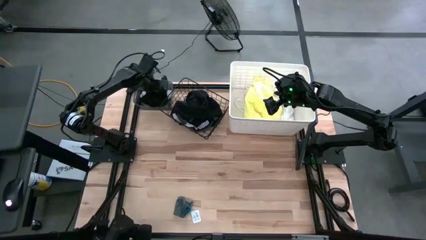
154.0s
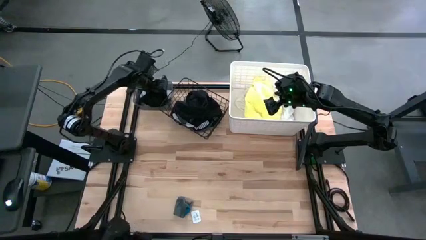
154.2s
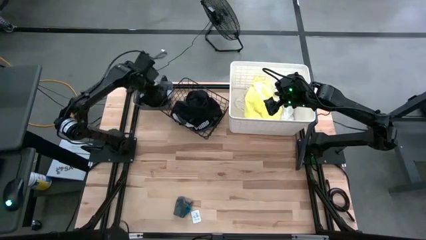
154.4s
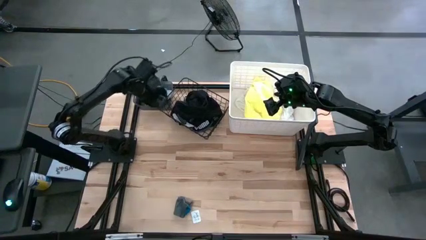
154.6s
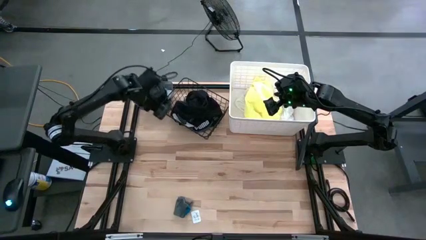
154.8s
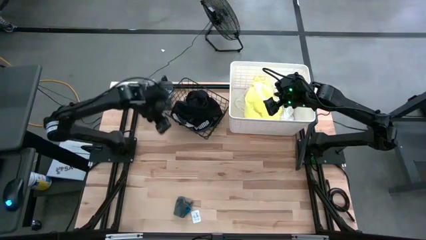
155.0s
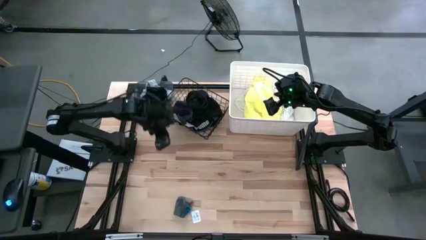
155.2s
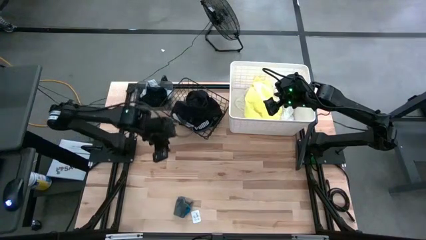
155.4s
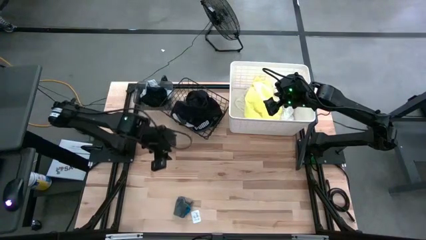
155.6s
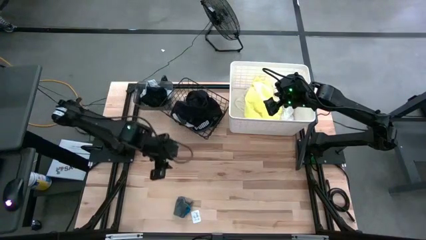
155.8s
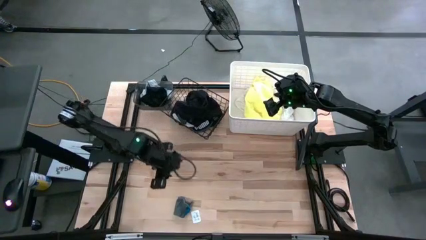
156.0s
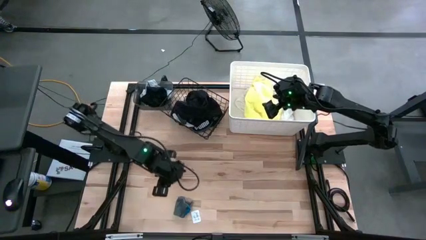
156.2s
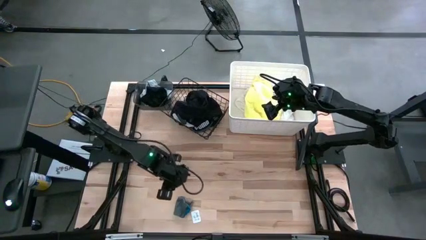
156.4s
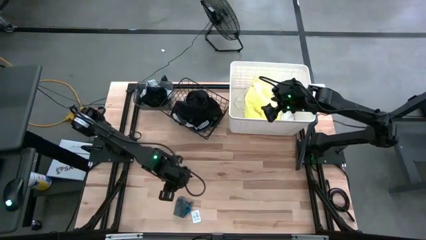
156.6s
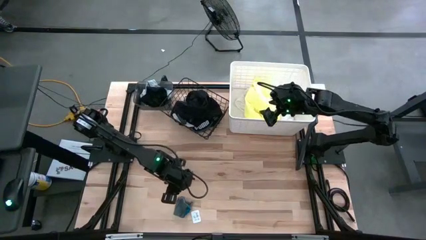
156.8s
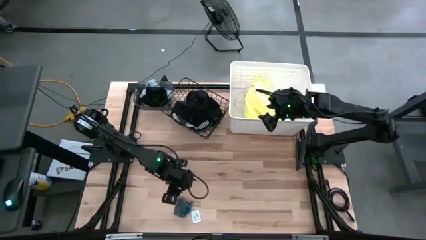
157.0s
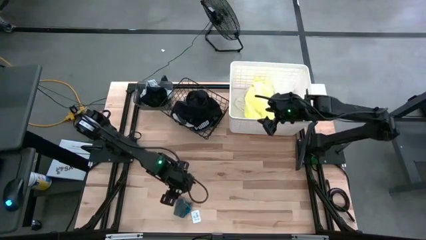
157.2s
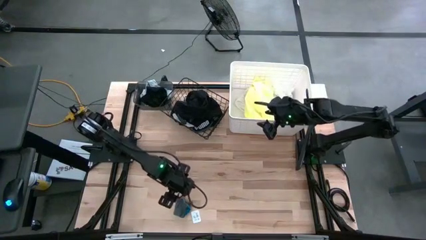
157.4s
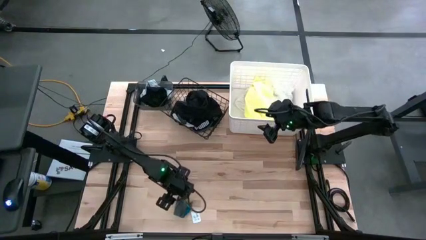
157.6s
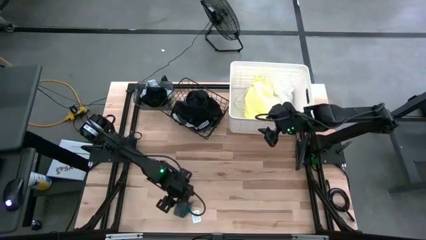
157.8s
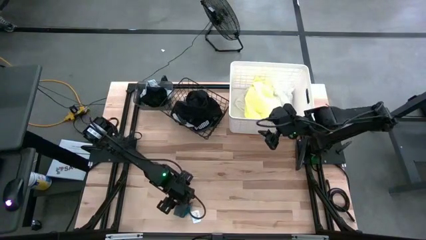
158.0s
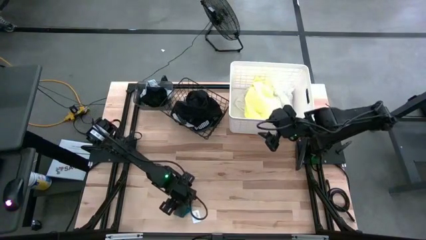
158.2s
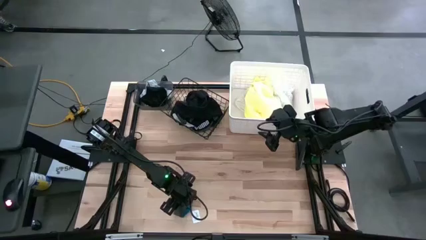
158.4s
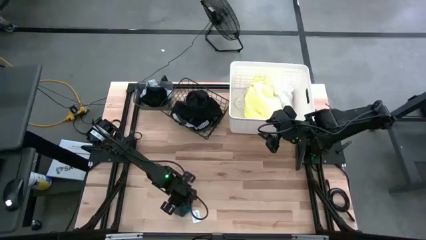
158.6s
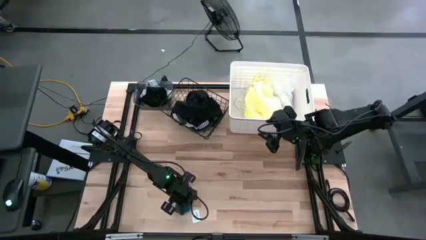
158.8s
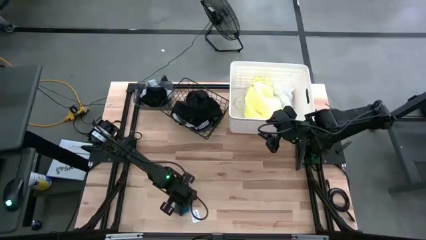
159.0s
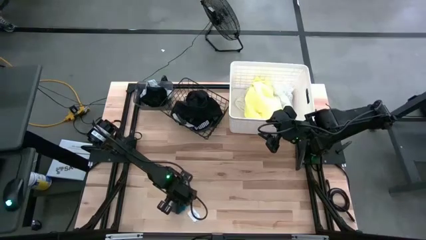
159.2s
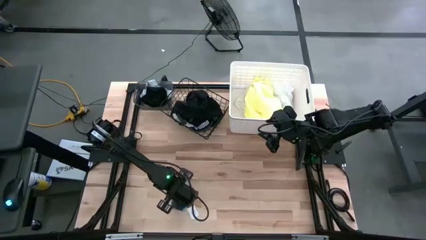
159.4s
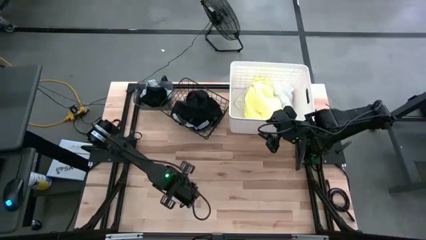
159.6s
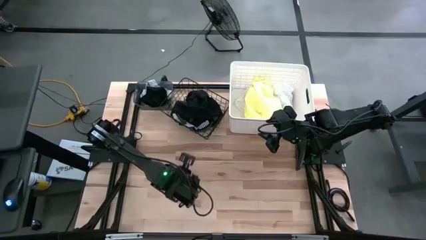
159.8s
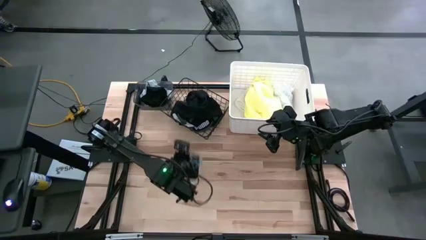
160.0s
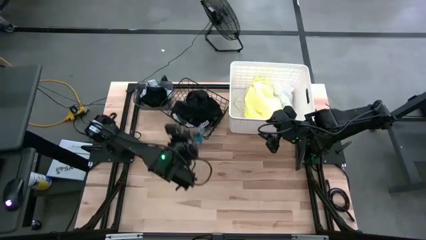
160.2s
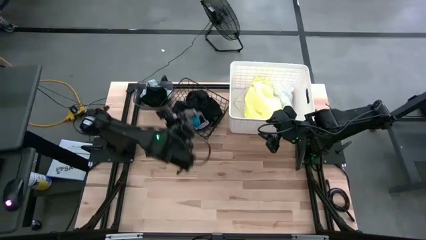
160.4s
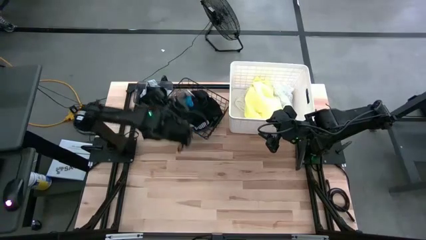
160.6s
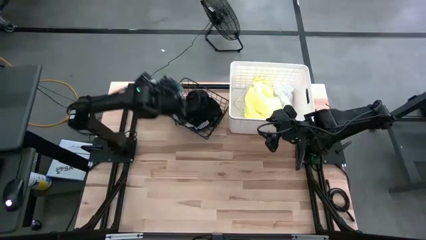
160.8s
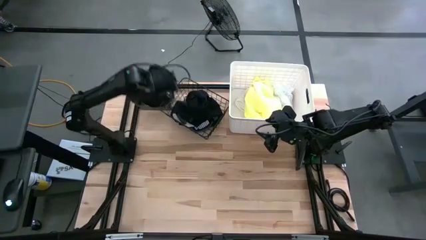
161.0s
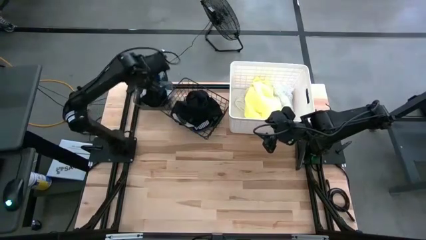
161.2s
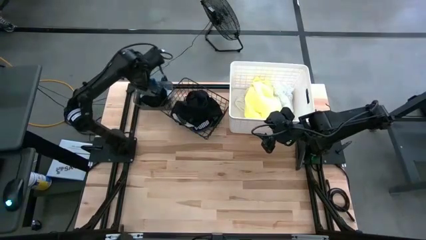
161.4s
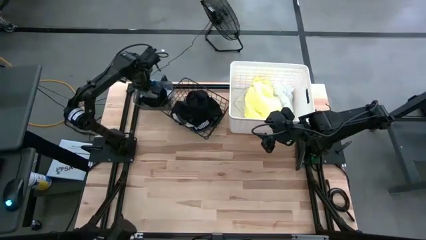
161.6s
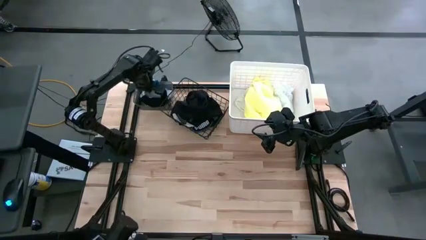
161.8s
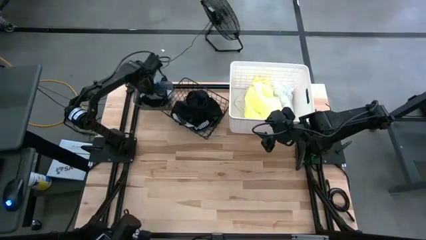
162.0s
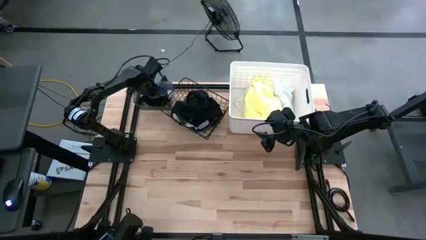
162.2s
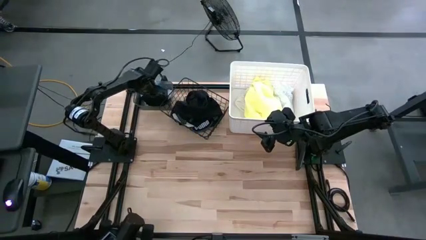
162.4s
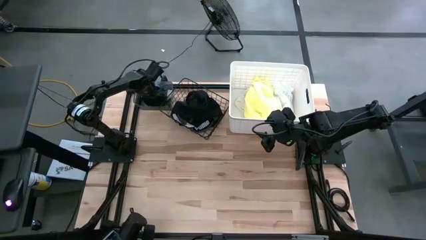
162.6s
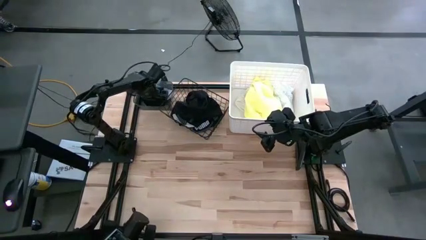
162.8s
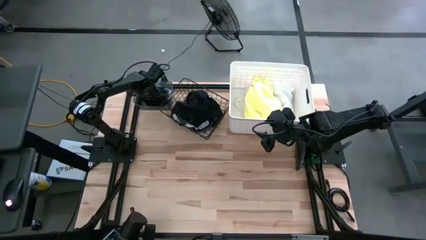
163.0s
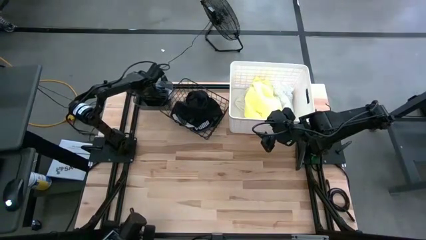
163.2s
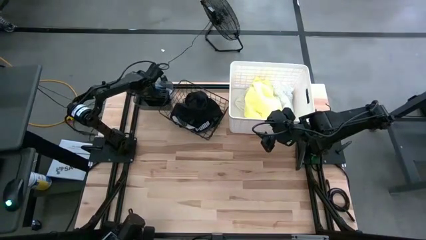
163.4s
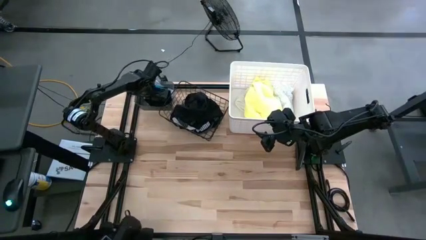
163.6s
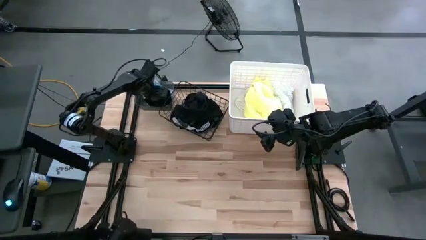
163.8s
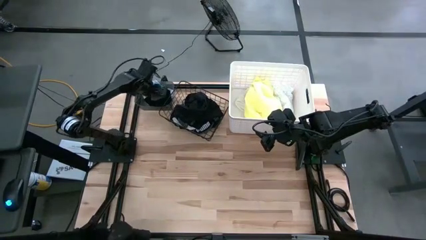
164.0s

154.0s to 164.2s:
Task: Pick & Place Cloths
Put the gray sock into the black bin

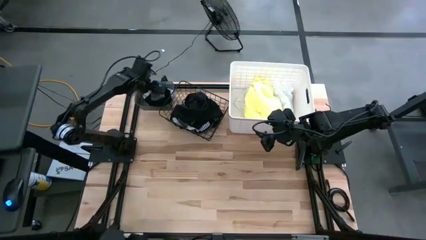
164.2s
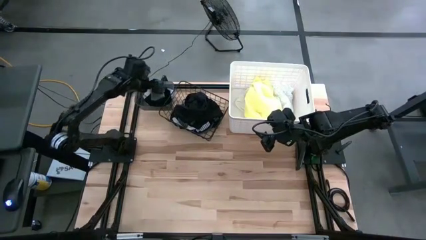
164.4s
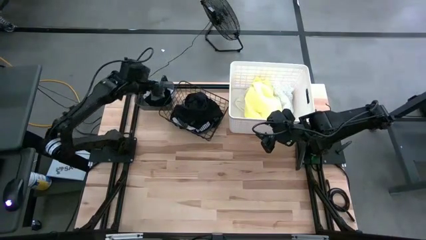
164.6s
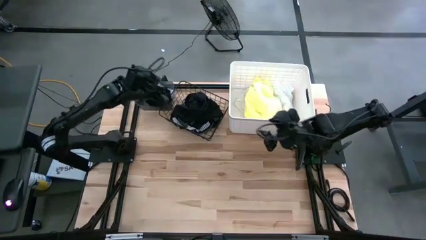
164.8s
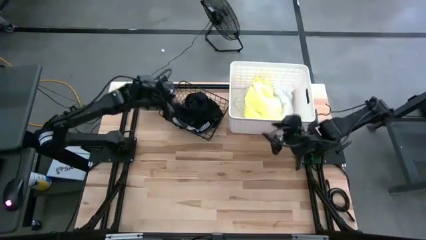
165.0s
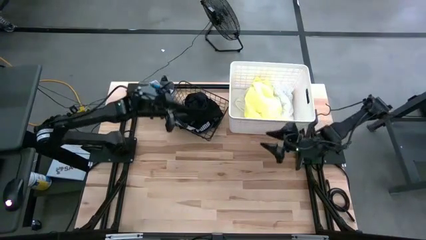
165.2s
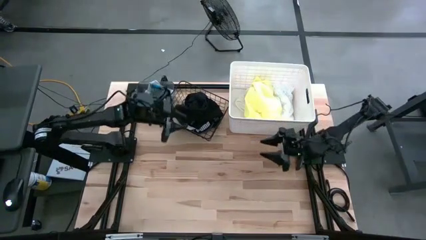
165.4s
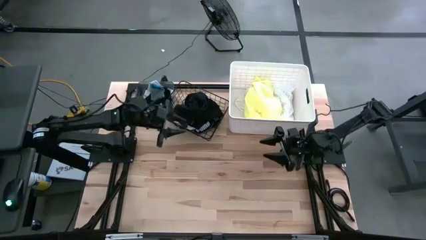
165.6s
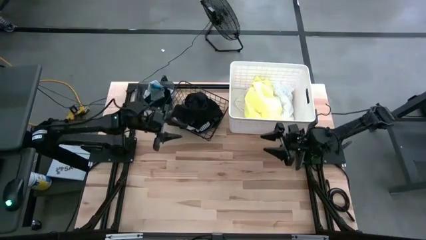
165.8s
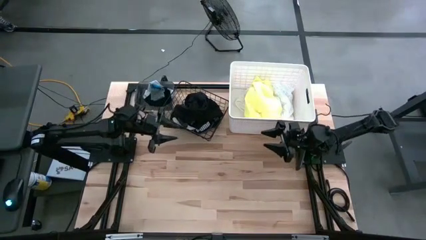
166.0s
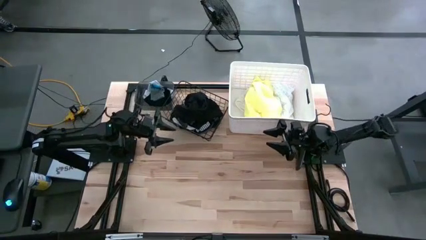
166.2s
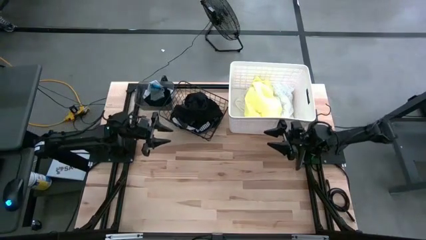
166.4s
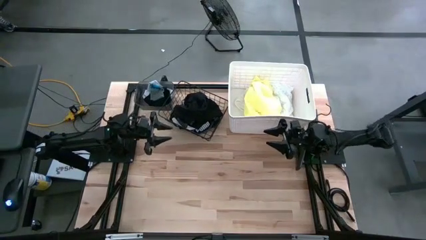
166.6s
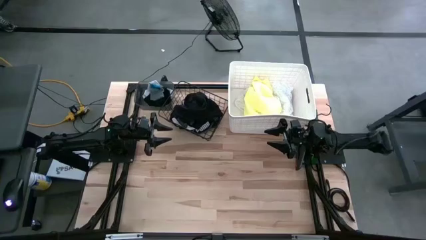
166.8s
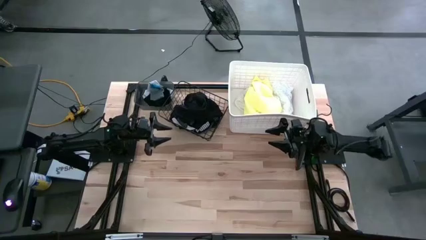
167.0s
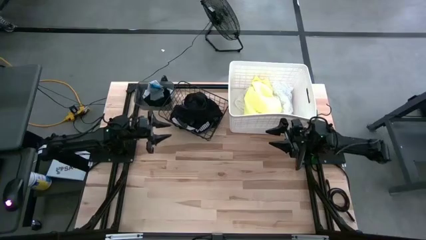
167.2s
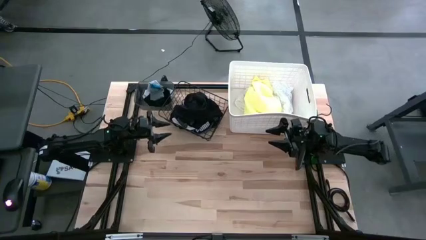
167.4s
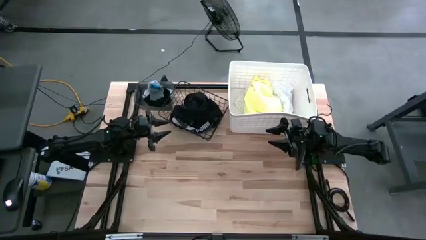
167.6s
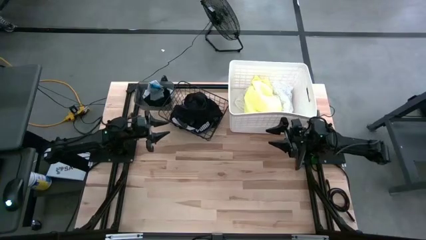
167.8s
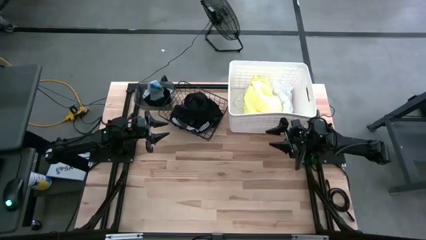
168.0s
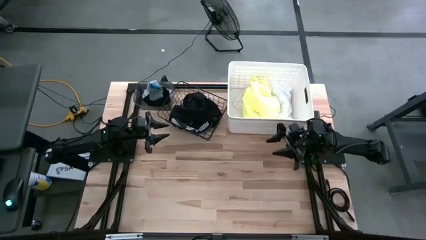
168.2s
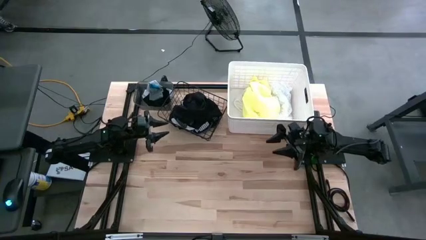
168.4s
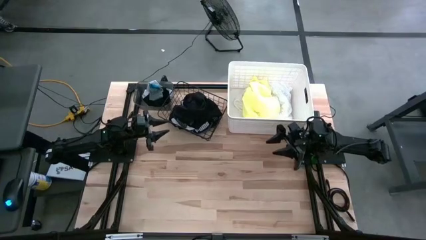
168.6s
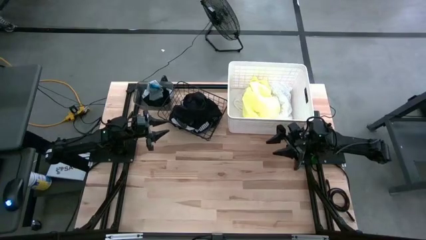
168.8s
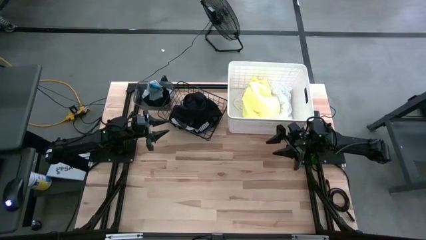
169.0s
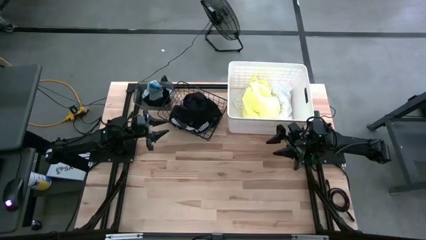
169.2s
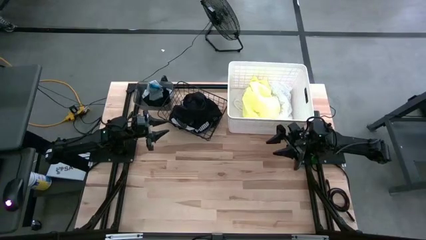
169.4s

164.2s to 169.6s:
Return to Home Position
